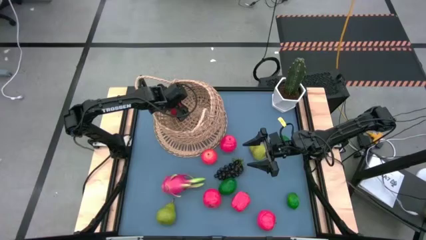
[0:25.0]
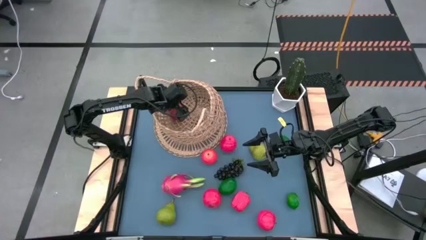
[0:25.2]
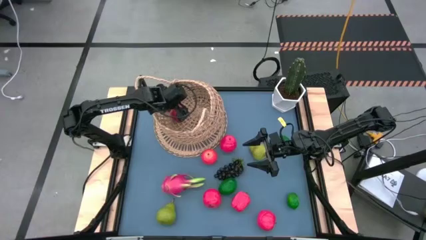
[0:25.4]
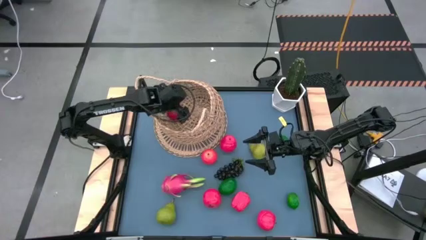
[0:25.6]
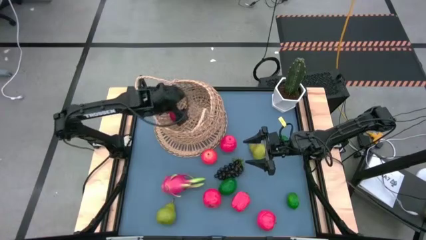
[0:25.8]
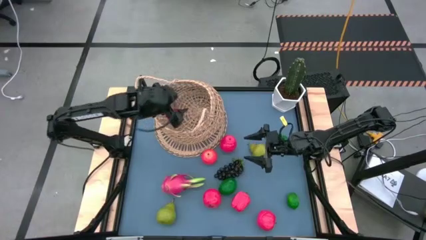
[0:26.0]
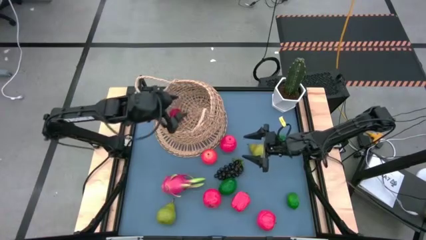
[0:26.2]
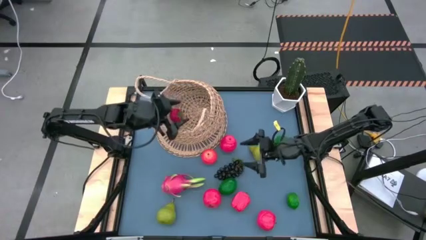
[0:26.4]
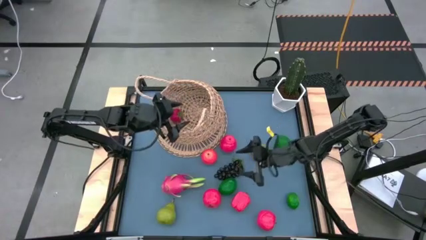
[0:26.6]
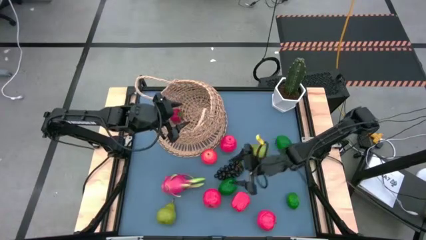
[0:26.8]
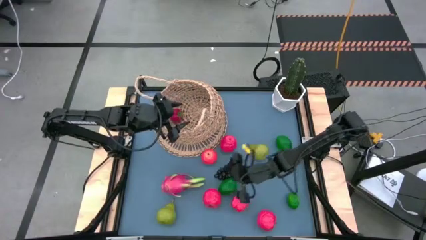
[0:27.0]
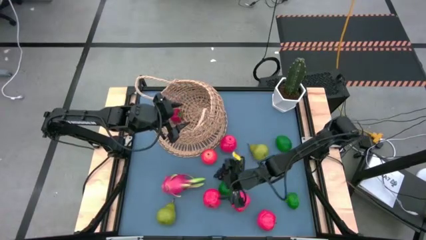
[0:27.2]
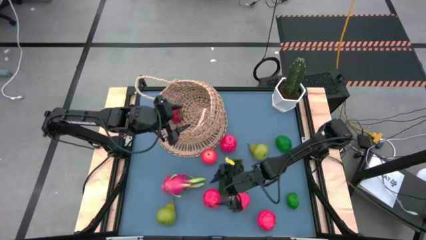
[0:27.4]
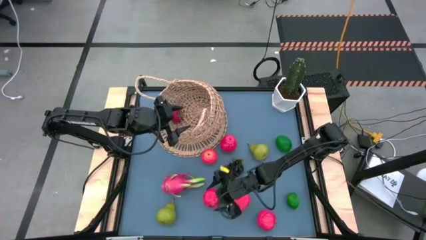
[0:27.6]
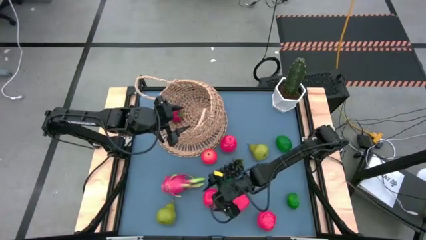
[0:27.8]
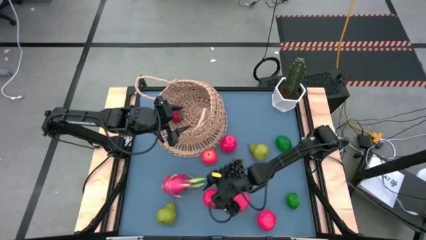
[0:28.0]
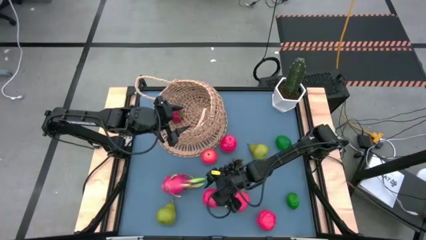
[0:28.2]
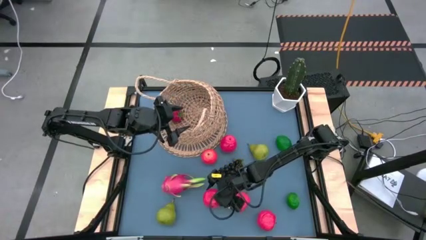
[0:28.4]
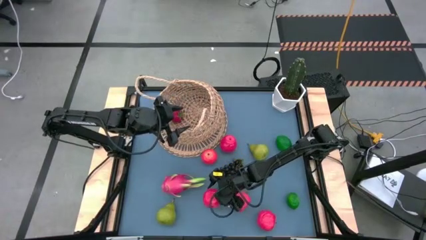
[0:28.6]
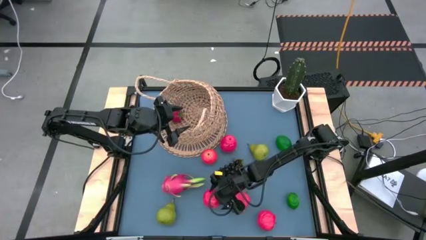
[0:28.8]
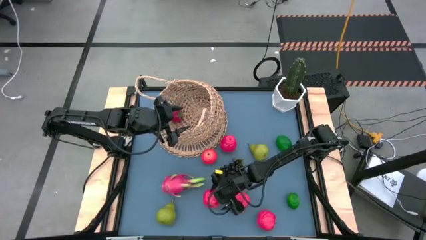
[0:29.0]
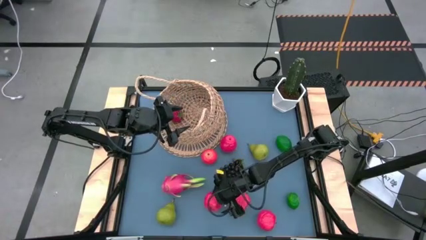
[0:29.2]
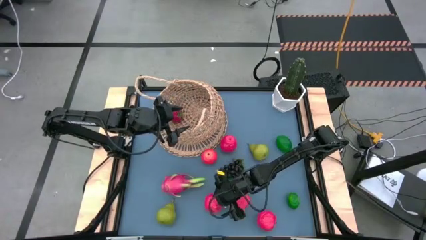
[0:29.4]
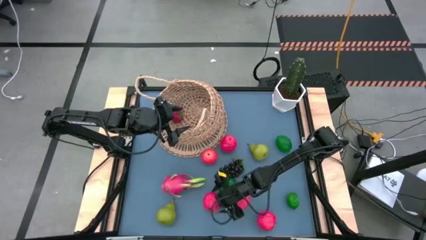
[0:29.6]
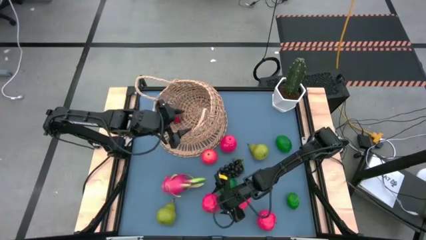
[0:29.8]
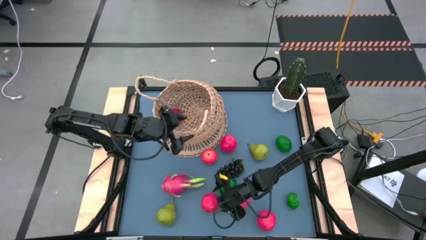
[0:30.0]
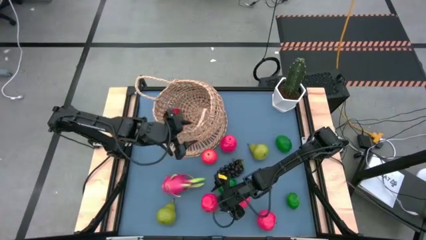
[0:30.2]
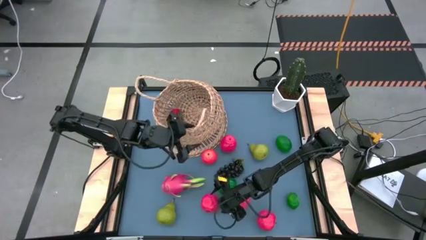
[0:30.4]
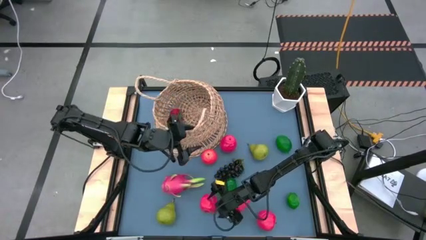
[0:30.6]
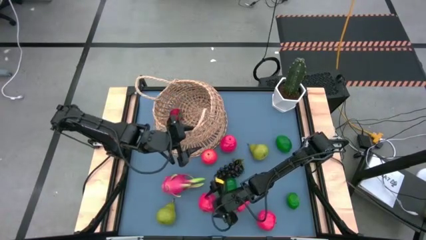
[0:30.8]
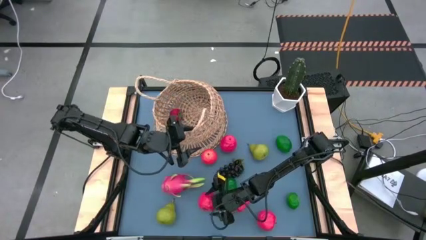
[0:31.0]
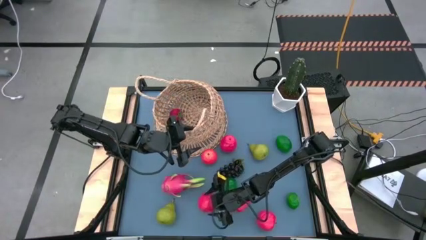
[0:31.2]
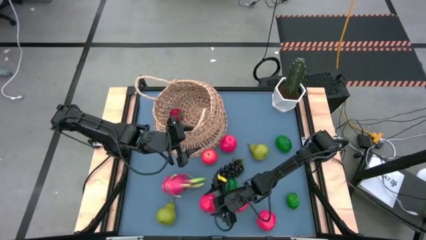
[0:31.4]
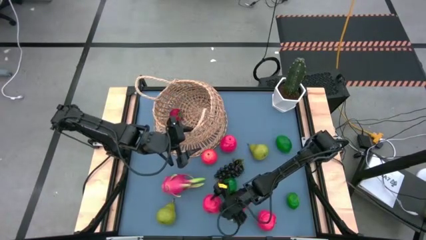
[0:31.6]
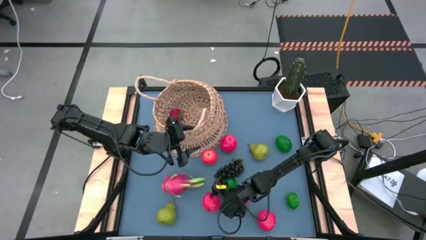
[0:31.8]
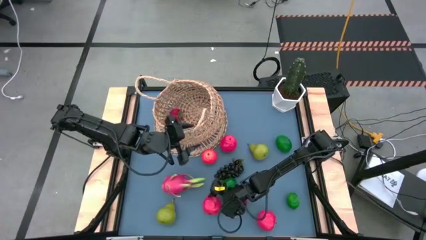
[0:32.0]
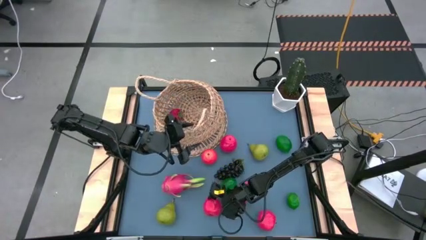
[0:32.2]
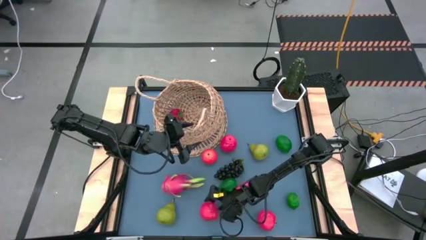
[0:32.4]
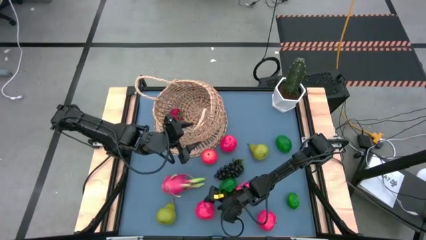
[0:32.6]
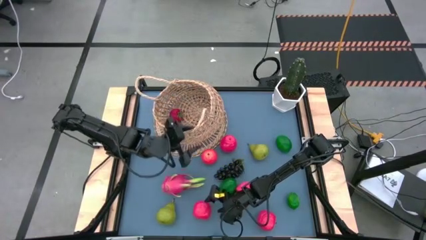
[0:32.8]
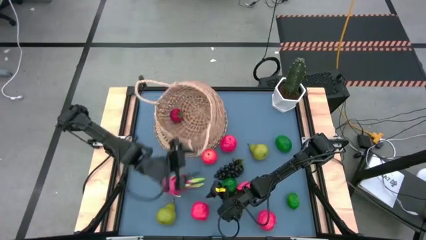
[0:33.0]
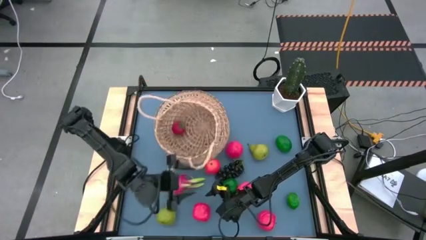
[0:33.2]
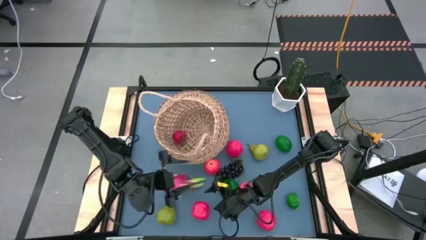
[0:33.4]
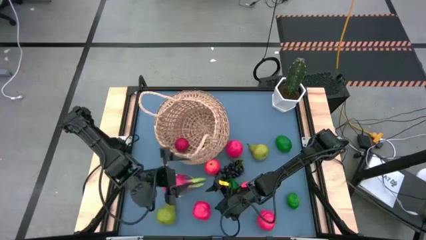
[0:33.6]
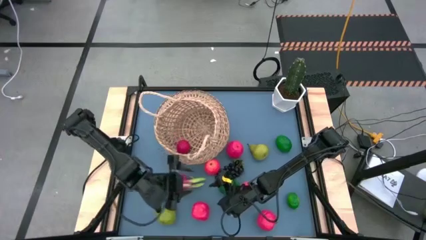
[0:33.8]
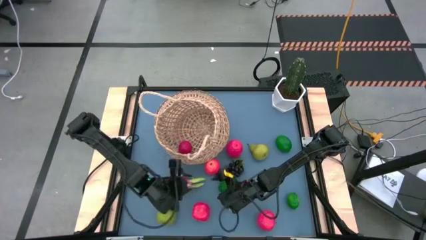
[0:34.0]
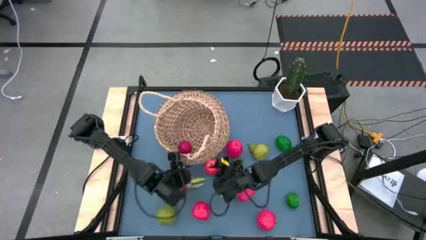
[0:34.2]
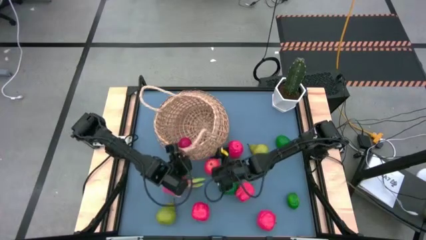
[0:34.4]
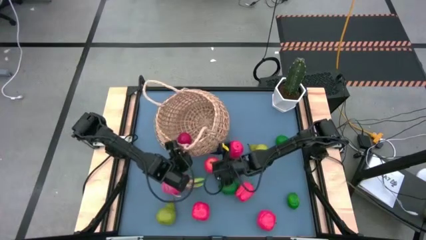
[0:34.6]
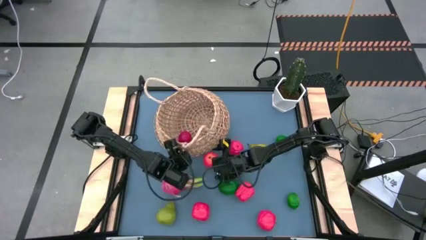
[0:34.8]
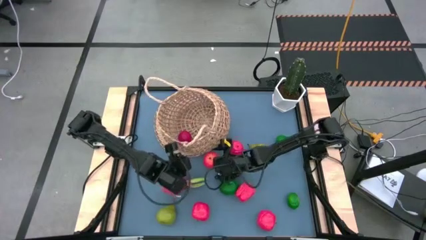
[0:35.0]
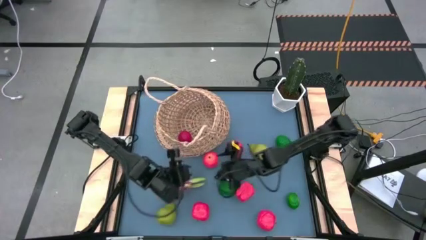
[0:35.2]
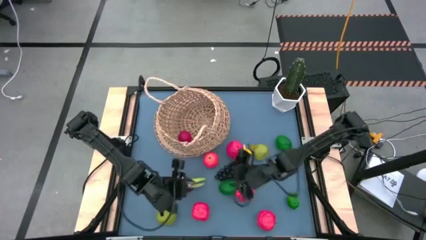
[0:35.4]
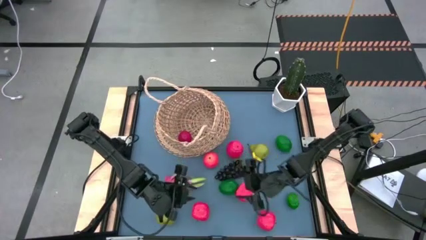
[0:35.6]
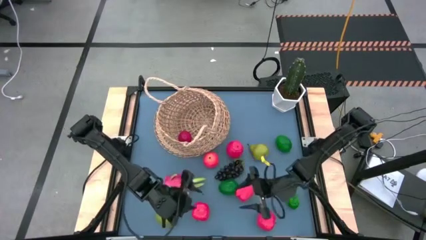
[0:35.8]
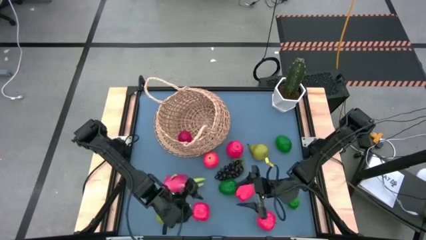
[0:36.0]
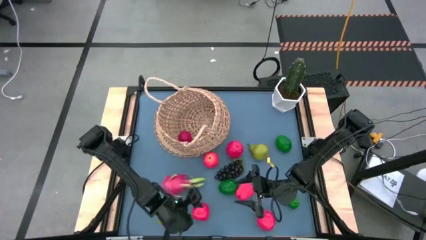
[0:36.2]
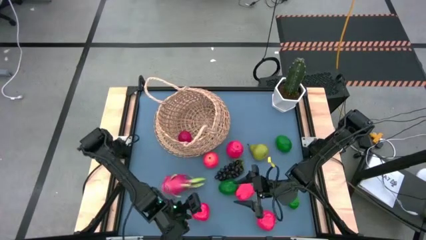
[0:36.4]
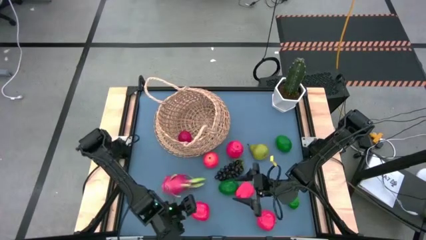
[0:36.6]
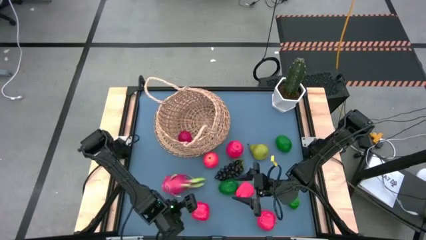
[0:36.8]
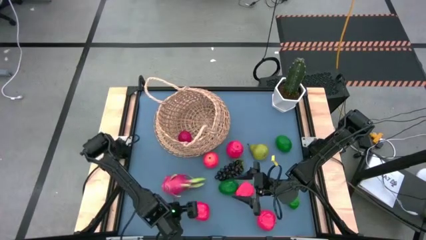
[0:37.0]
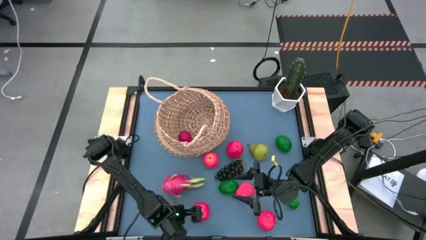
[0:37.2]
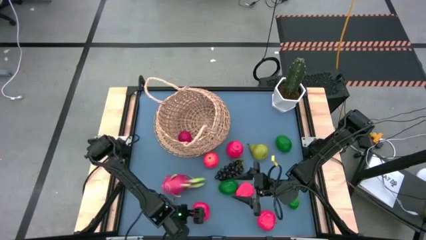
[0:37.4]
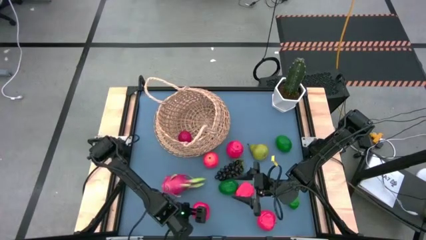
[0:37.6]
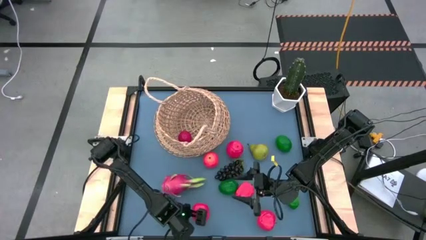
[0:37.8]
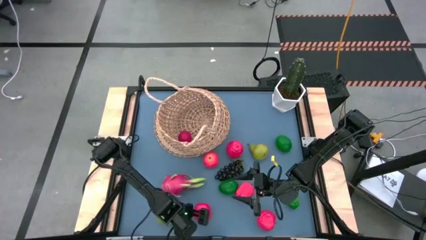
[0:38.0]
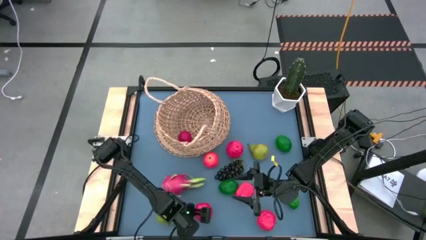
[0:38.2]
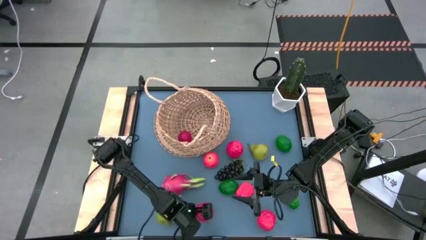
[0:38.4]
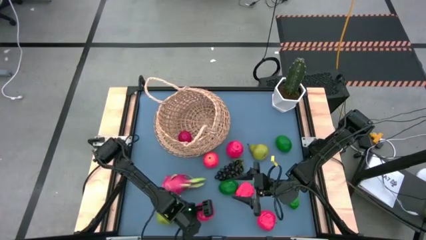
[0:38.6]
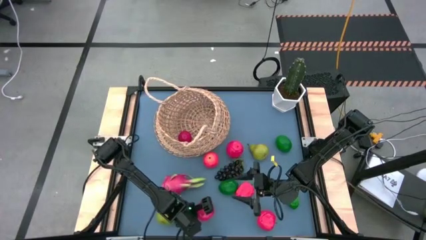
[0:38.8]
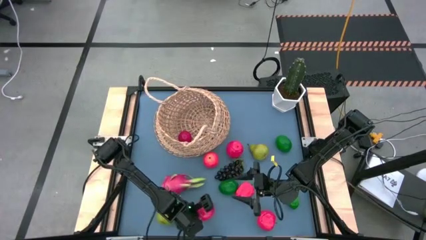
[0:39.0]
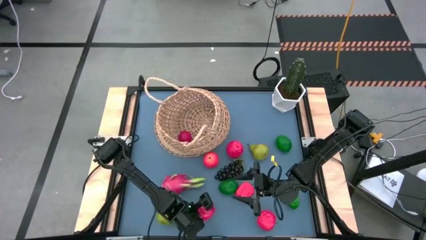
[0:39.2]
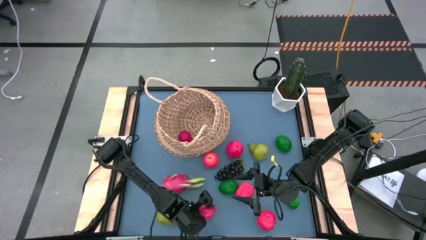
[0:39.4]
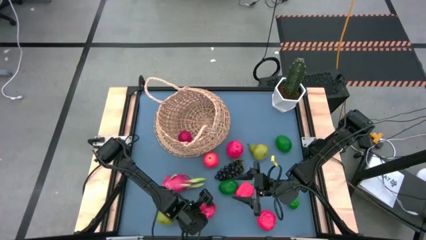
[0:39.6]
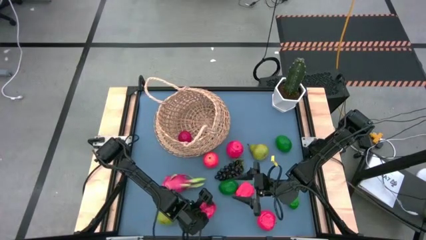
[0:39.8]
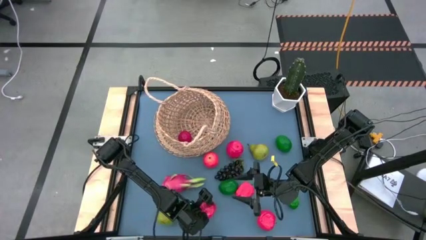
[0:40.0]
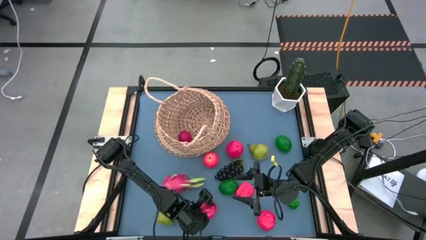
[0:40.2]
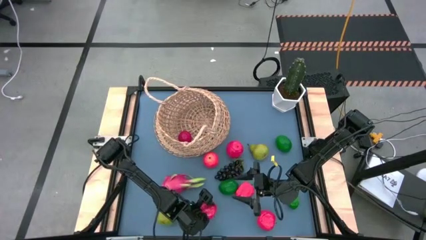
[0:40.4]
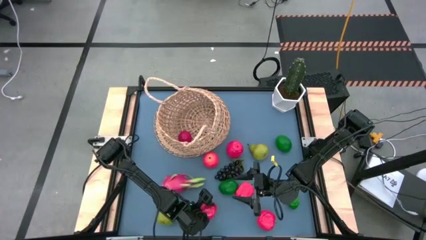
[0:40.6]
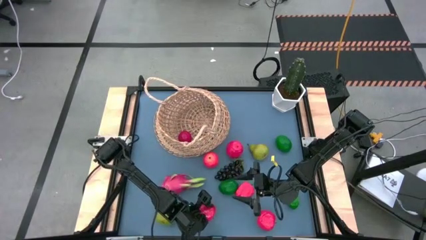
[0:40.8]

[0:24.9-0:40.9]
Task: Build produce basket
Put the red apple into the basket
